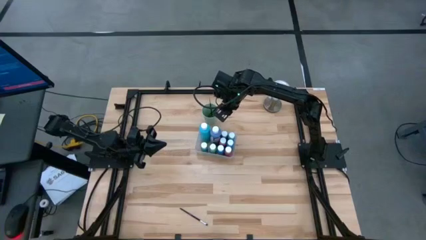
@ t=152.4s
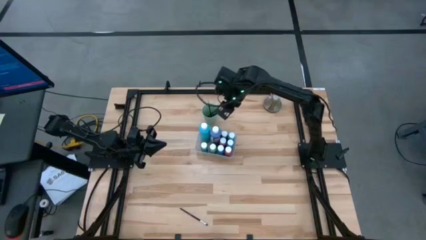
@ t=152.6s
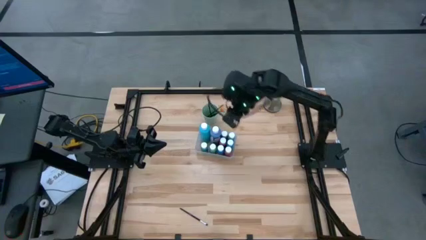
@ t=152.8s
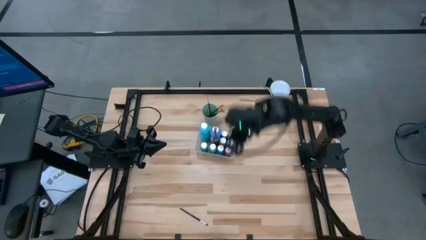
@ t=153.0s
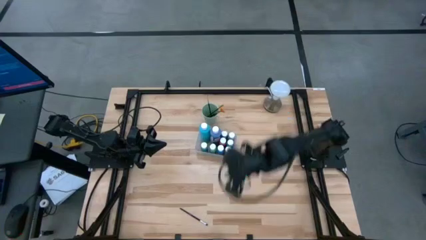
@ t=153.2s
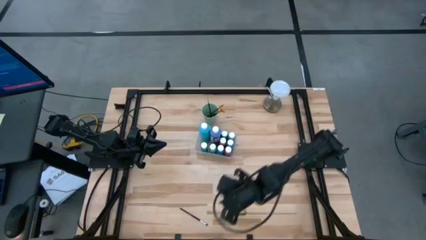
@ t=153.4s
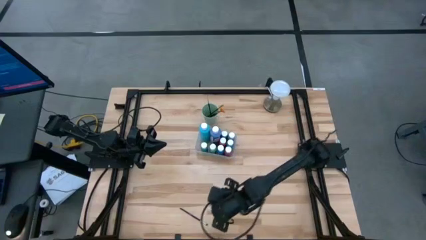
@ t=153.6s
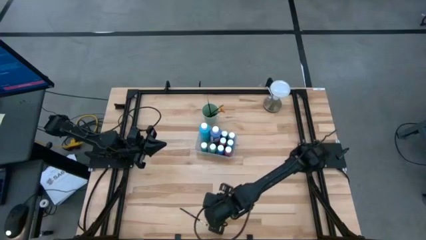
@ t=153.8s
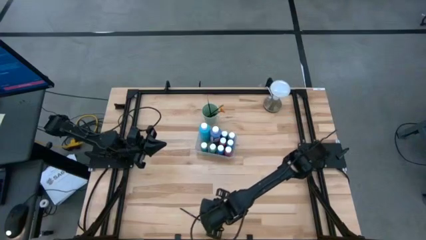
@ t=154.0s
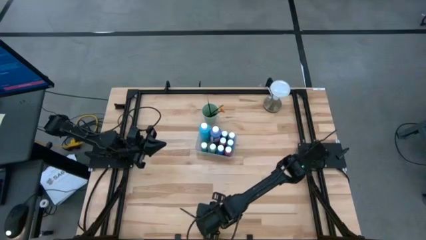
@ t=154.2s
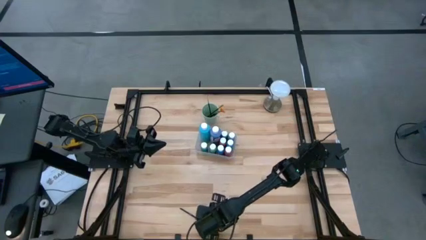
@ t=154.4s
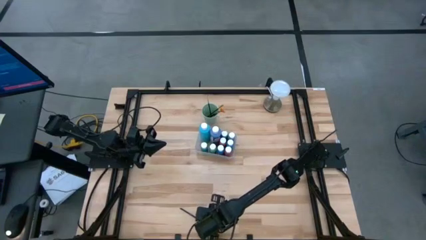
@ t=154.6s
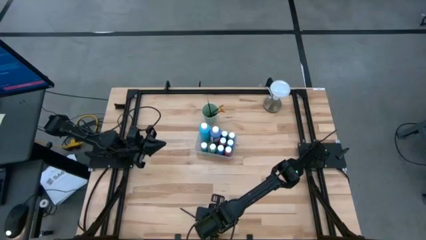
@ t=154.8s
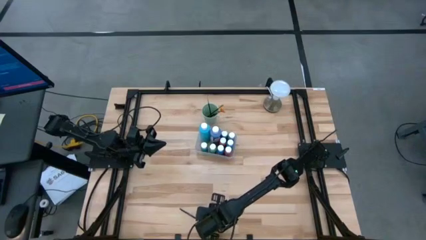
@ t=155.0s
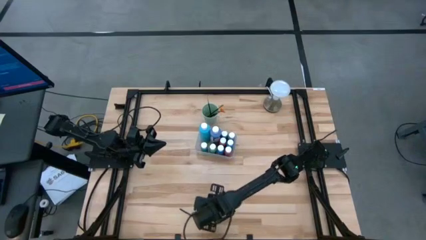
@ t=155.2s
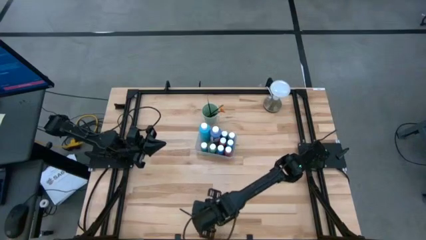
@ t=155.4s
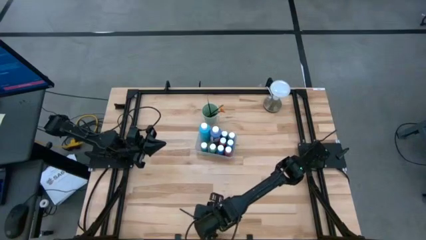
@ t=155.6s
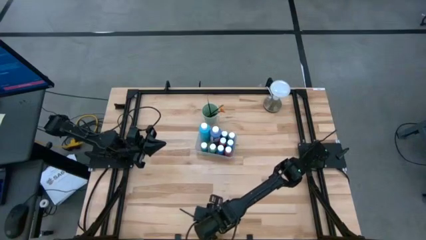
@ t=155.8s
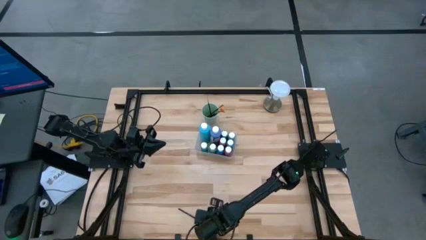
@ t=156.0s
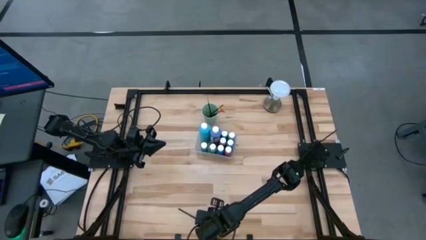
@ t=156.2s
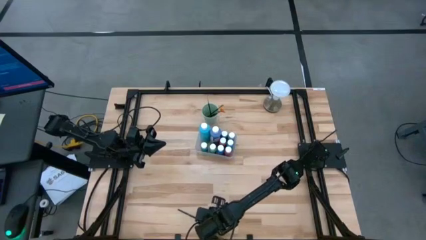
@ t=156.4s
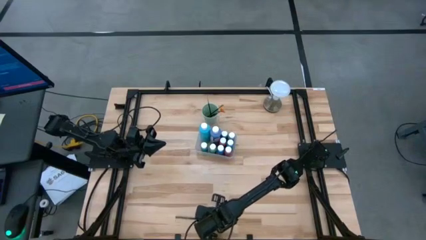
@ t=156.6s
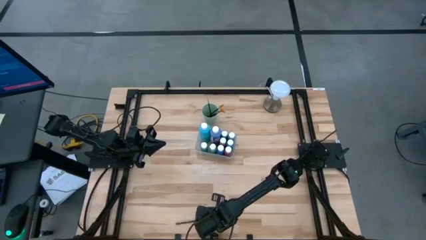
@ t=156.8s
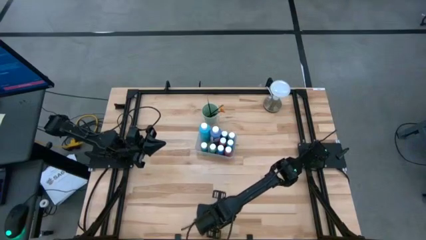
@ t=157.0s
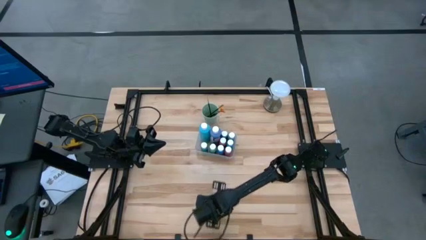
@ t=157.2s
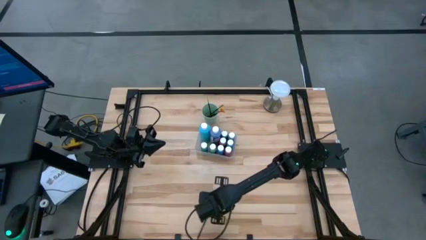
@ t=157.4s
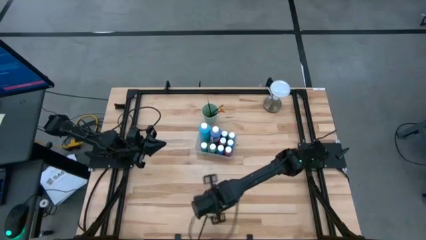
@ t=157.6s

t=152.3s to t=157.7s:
Task: Pick & Place Paint Supplies
Put the black brush into the green cup

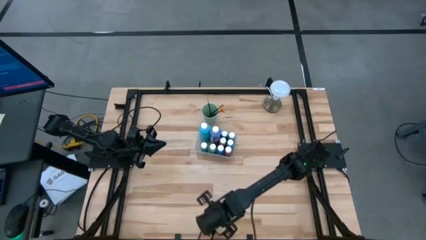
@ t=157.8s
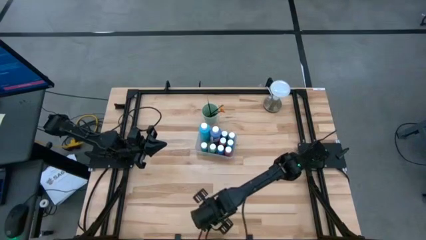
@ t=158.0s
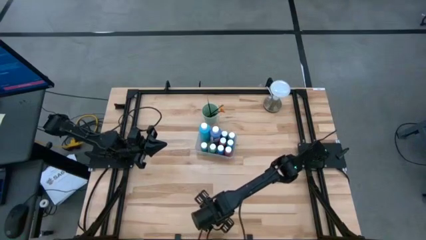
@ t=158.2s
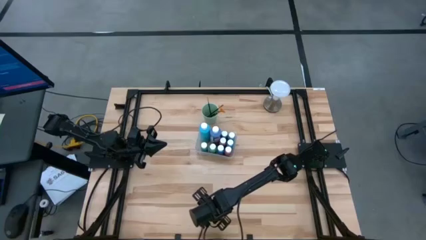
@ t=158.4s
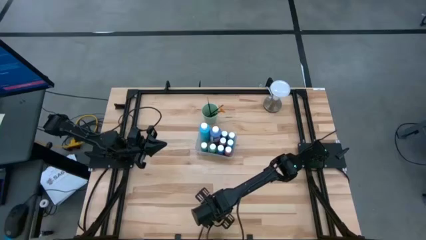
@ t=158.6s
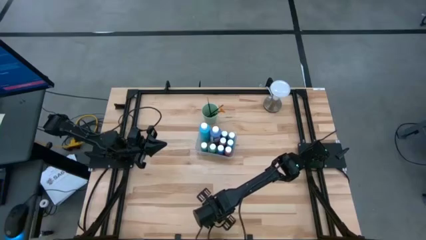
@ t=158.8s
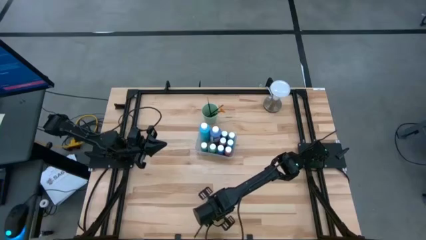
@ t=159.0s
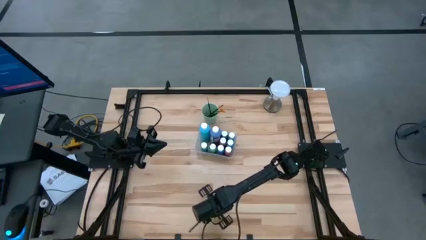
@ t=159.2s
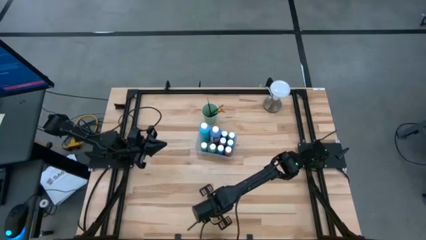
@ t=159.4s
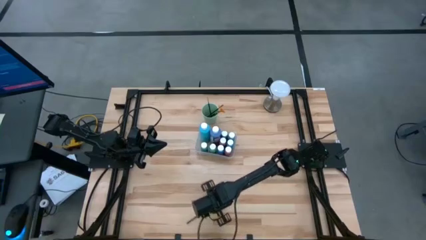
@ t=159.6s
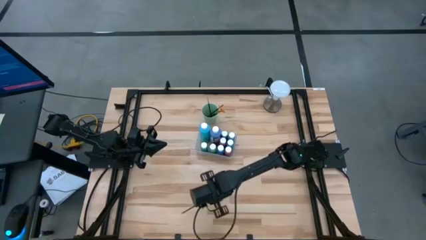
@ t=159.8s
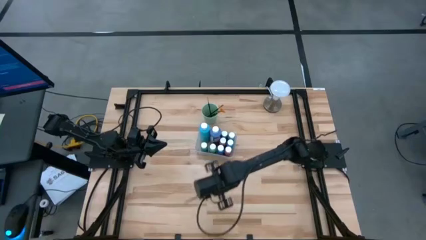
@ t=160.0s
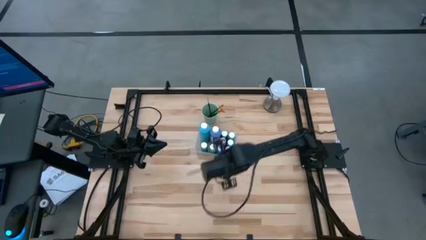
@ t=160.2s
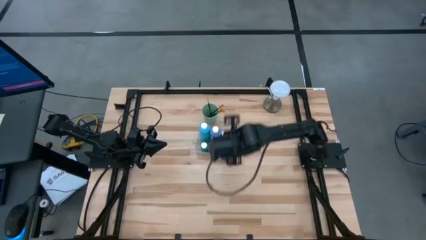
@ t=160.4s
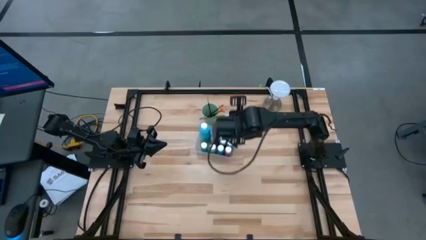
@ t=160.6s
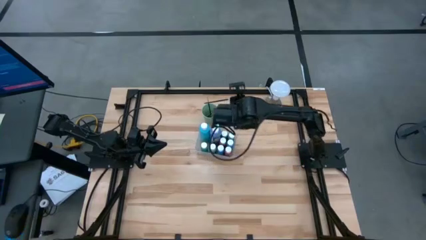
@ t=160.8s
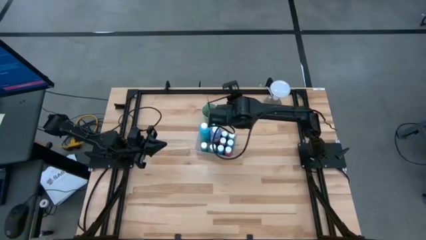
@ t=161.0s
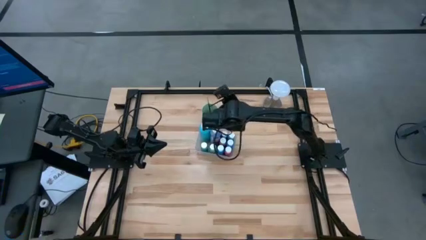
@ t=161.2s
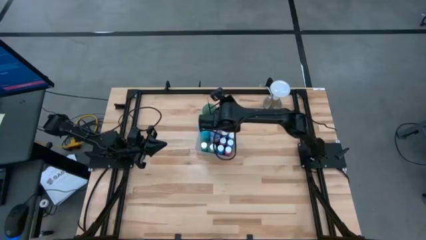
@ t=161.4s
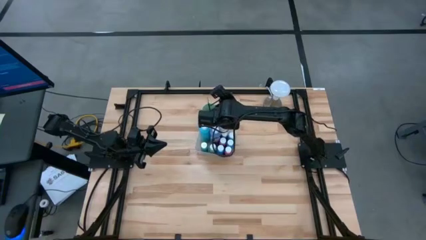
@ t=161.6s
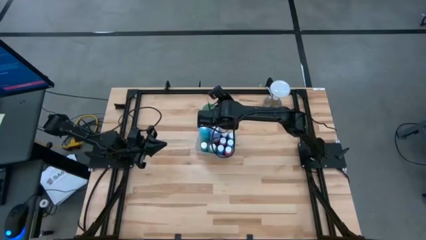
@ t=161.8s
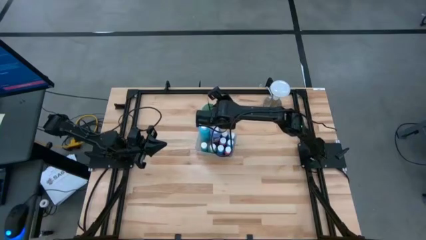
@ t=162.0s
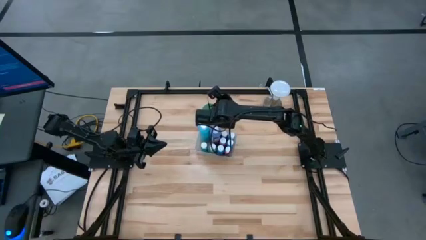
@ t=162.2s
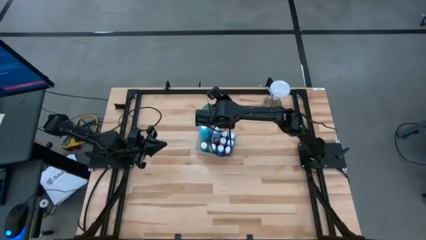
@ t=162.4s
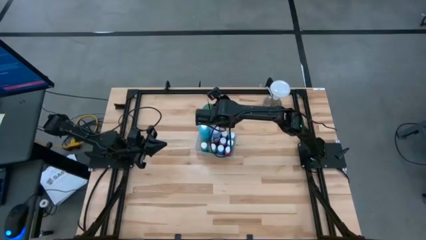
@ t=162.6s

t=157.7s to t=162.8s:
Put the black brush into the green cup

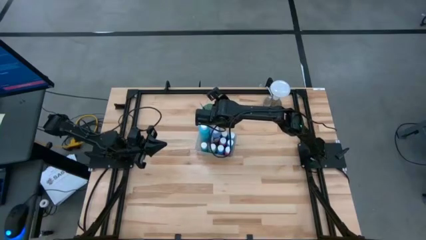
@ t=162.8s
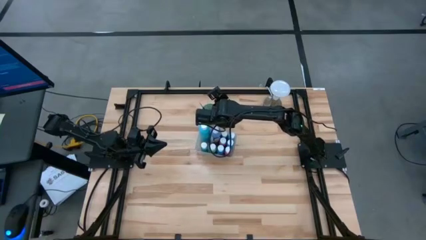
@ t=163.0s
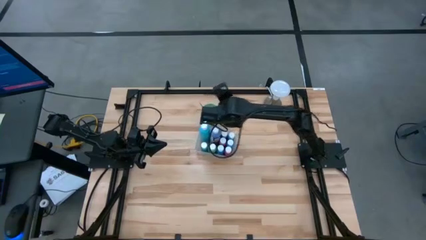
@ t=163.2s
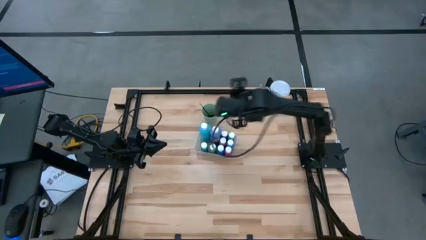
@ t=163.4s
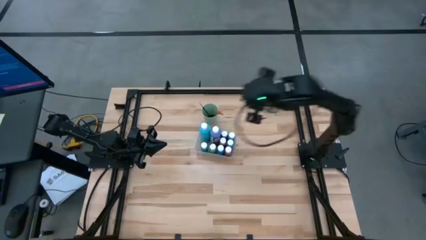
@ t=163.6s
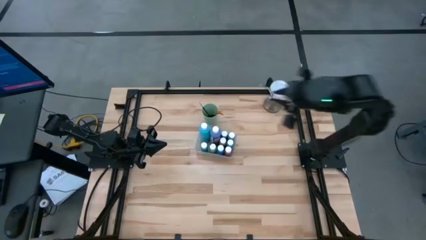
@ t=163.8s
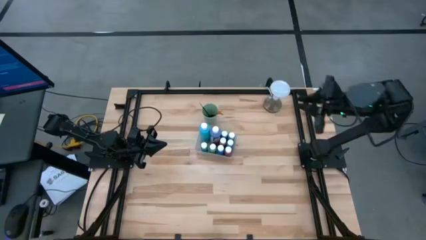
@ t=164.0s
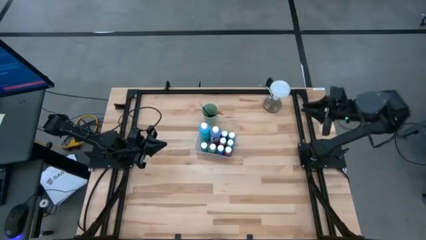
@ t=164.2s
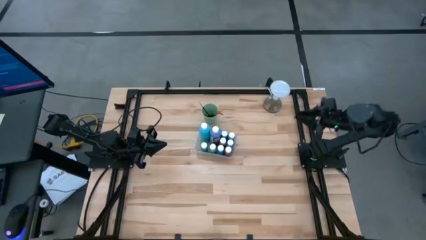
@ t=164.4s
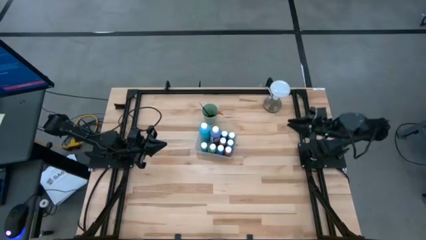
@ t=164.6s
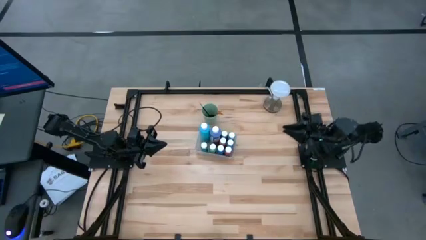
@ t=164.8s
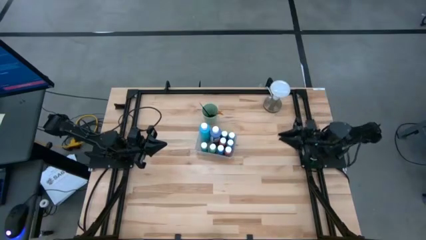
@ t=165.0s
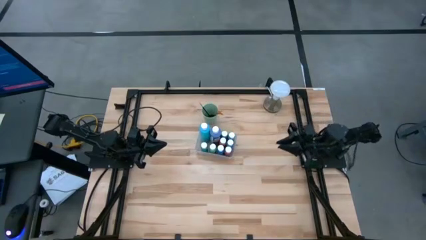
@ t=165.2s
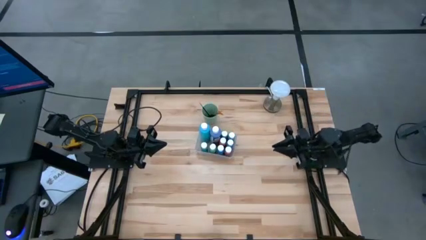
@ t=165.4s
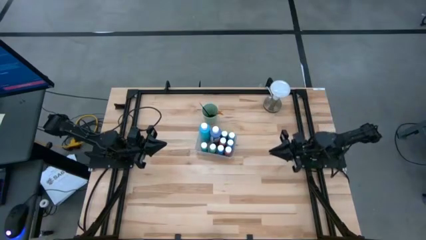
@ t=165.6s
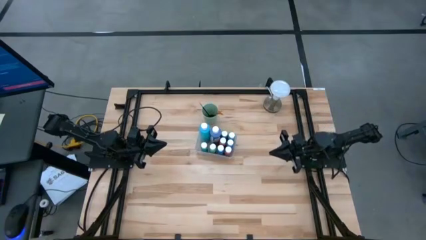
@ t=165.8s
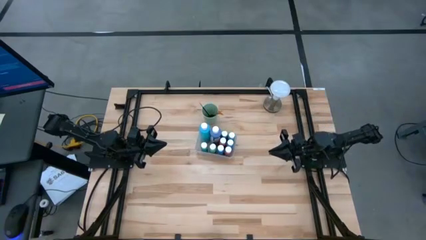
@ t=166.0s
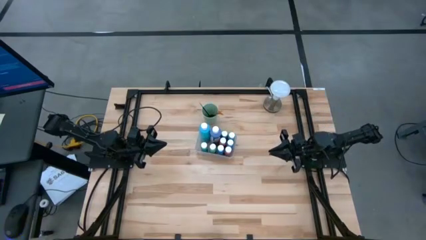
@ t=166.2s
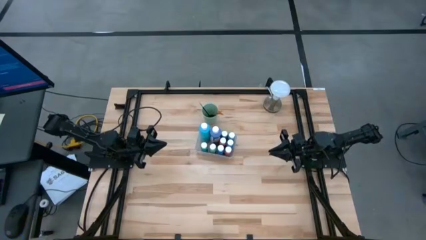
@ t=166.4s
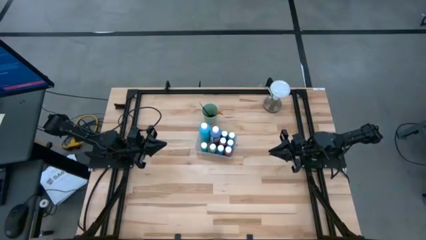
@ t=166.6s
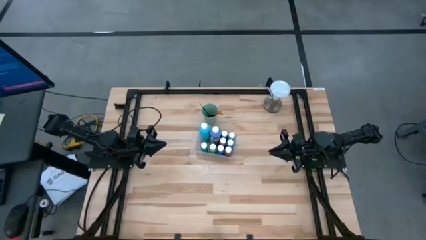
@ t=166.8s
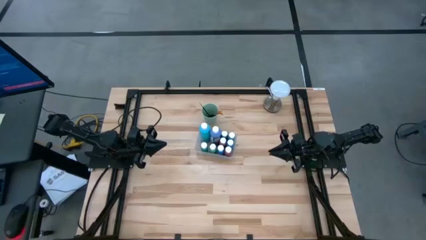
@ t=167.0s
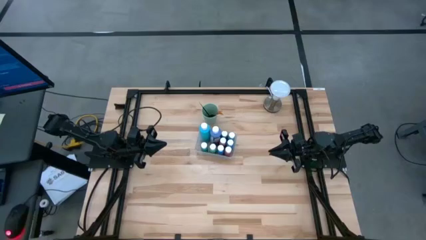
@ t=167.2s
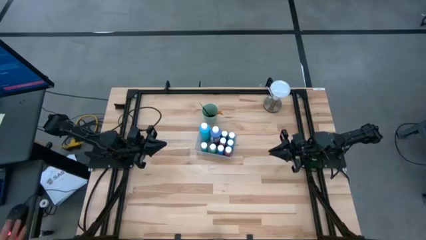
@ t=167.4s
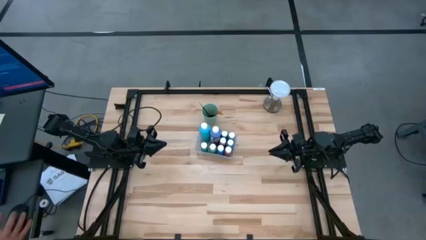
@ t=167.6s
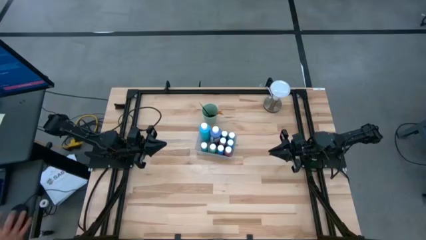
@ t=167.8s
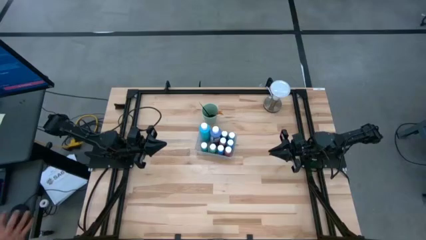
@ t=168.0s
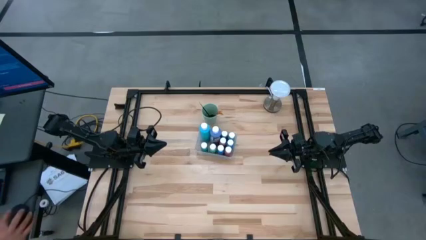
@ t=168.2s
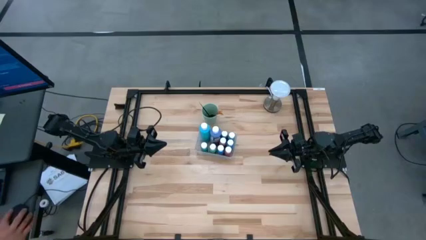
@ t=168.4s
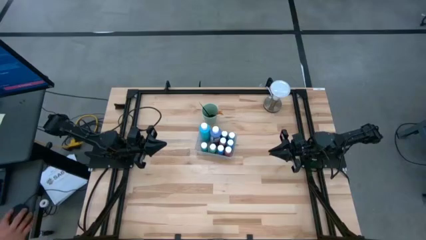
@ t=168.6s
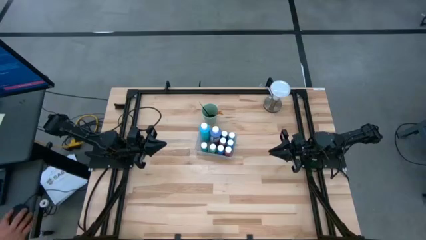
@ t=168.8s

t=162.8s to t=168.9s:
Return to Home Position
